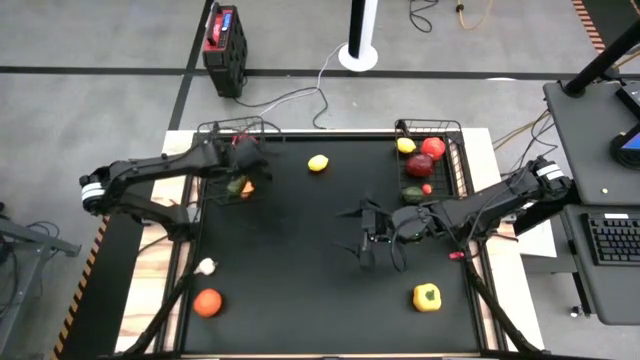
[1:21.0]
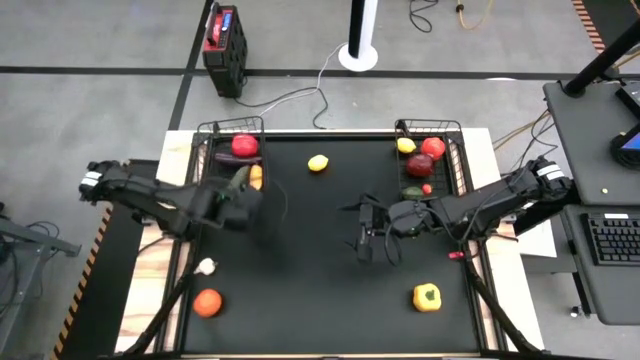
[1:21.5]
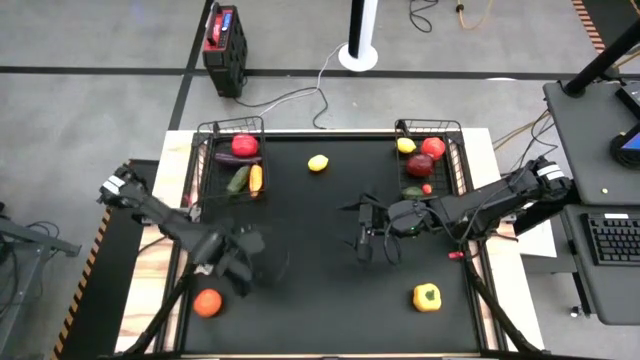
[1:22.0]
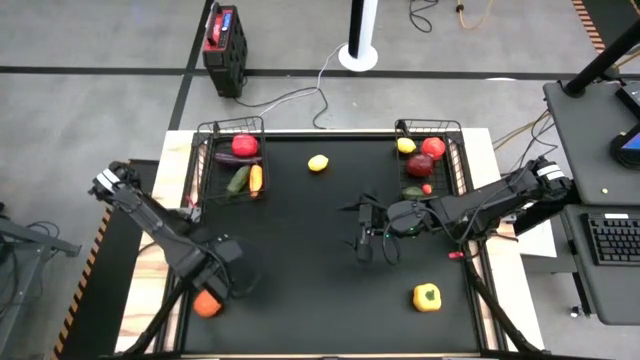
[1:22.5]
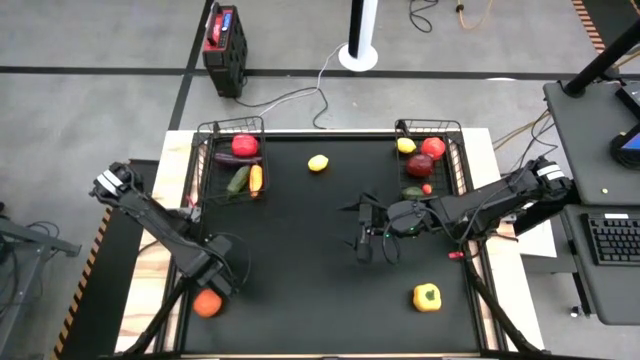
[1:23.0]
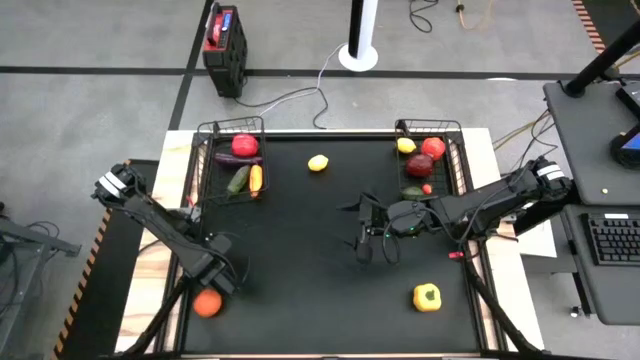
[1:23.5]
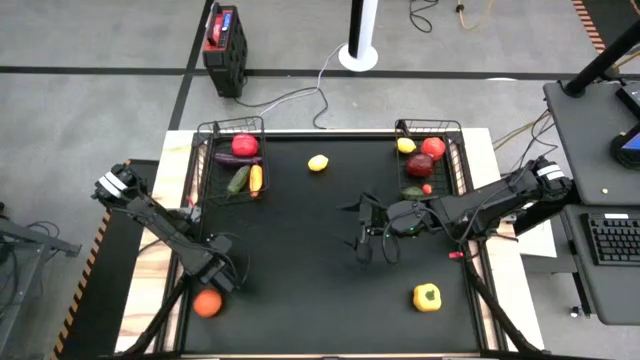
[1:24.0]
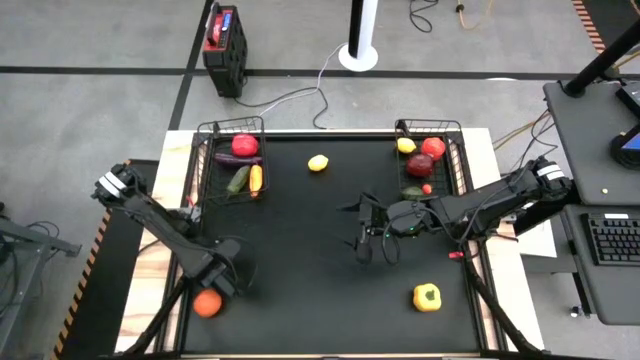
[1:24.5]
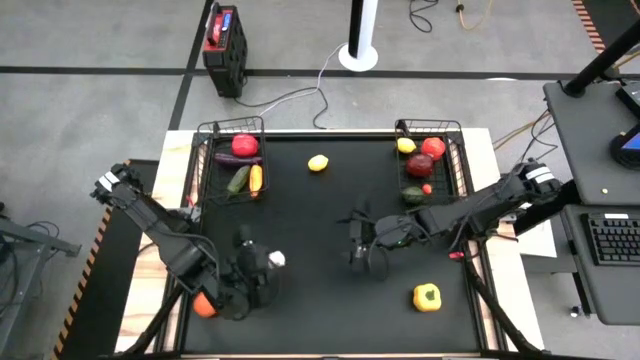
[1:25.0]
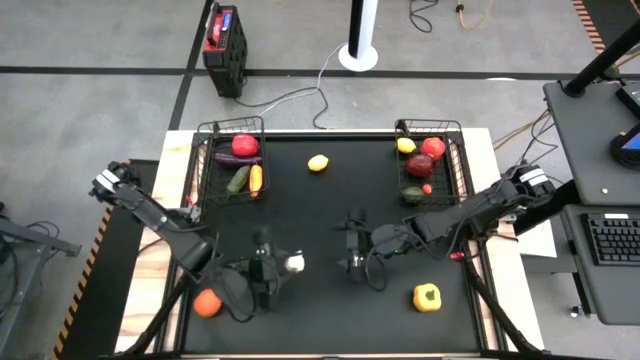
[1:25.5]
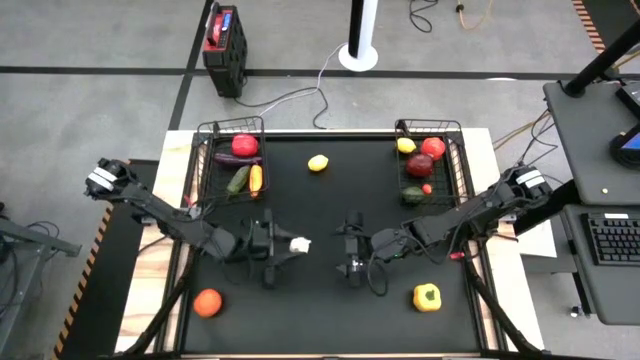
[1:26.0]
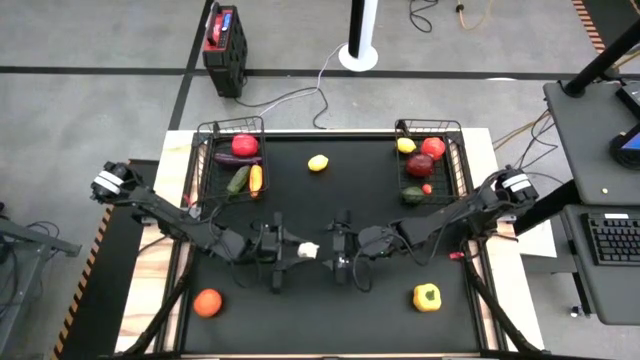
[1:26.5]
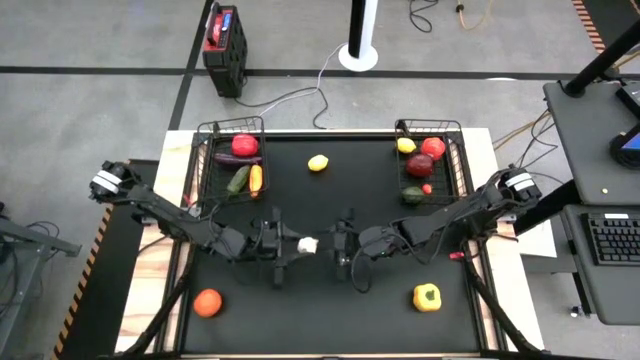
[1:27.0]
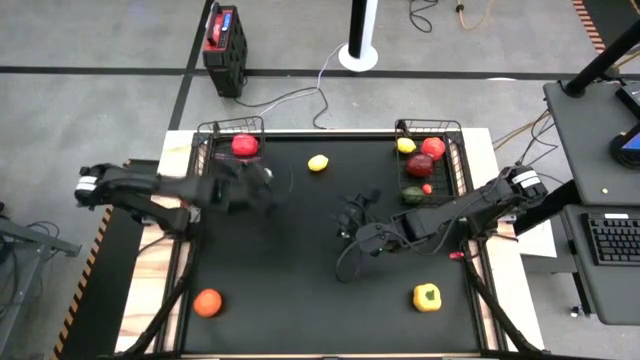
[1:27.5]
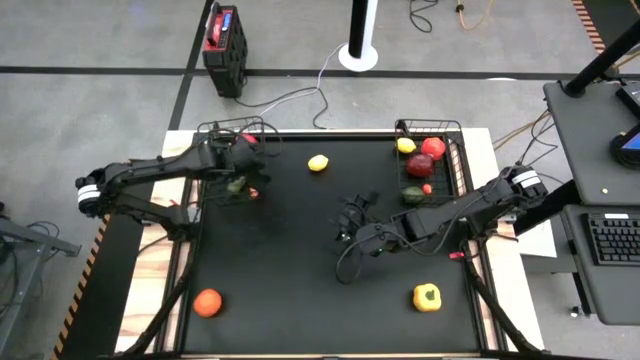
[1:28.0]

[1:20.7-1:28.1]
Task: Sort produce into baskets
Put the white garlic into the left wire basket

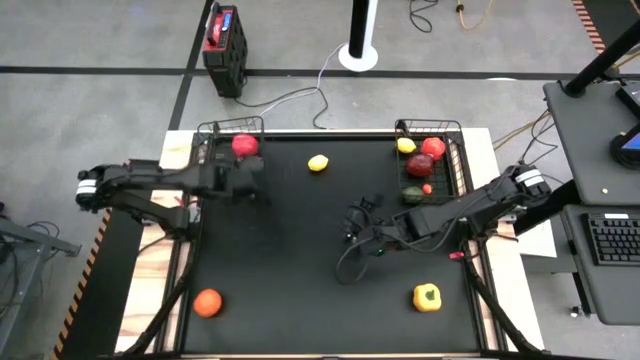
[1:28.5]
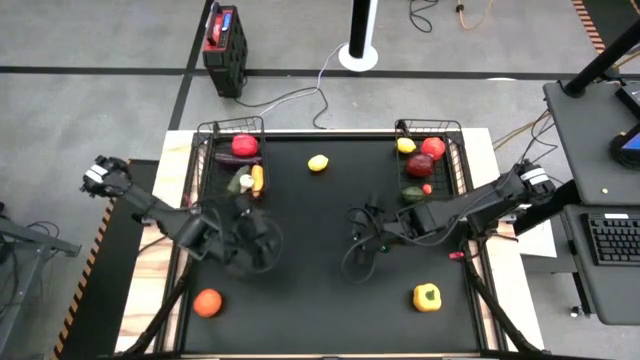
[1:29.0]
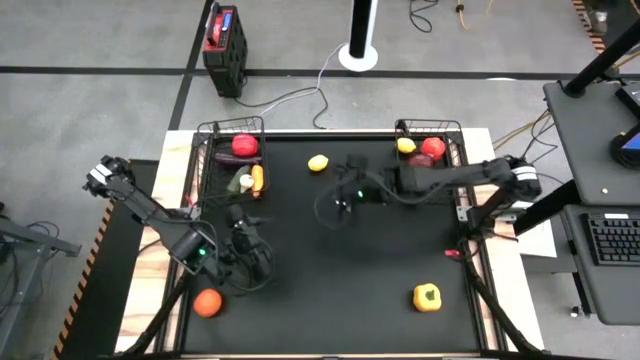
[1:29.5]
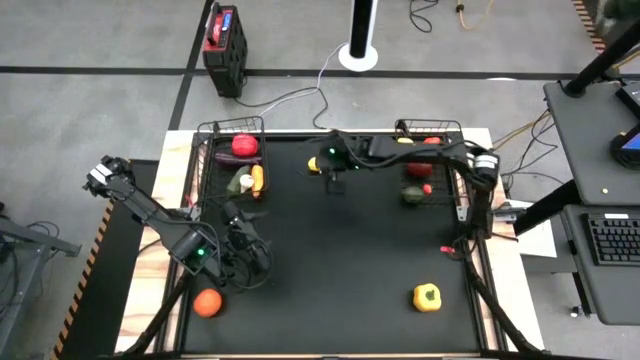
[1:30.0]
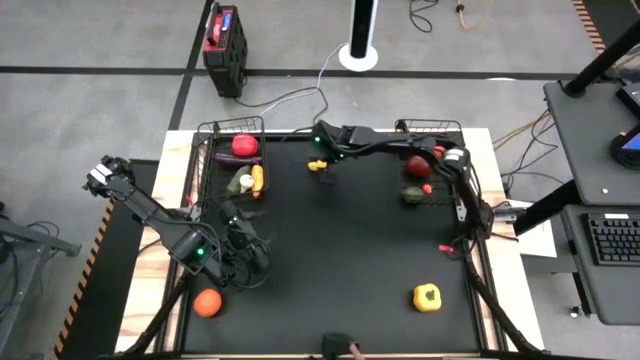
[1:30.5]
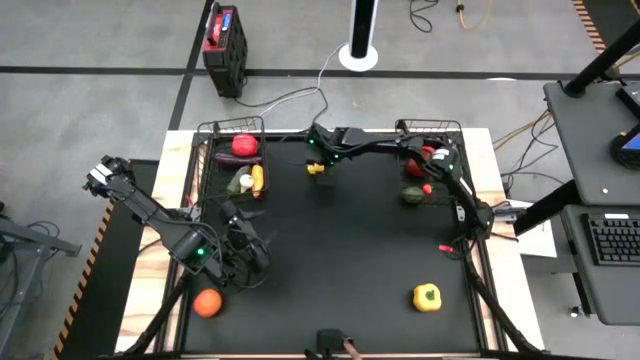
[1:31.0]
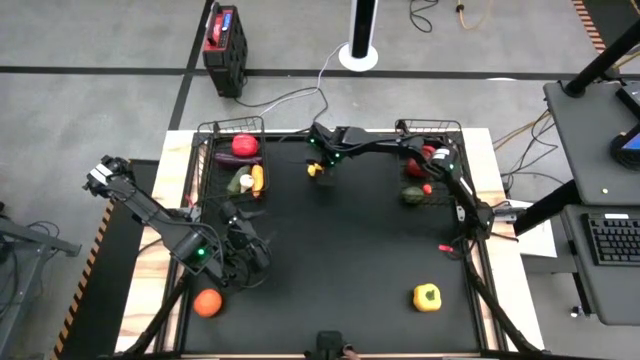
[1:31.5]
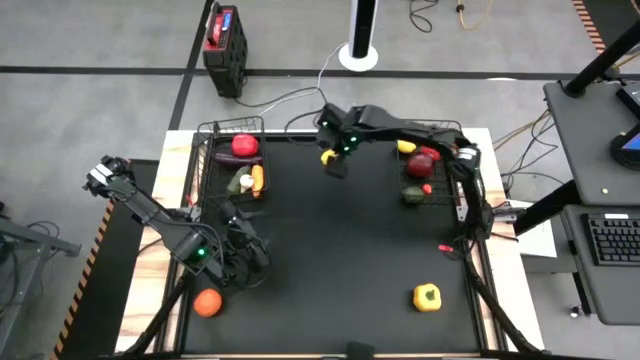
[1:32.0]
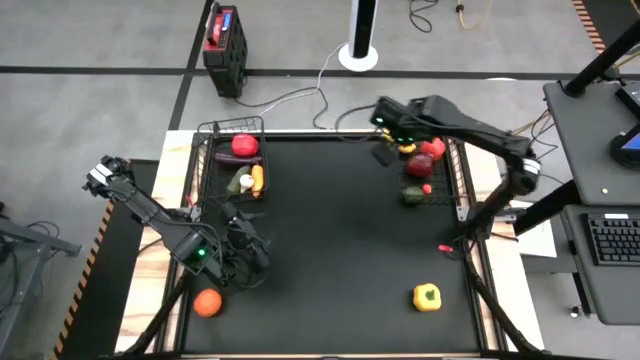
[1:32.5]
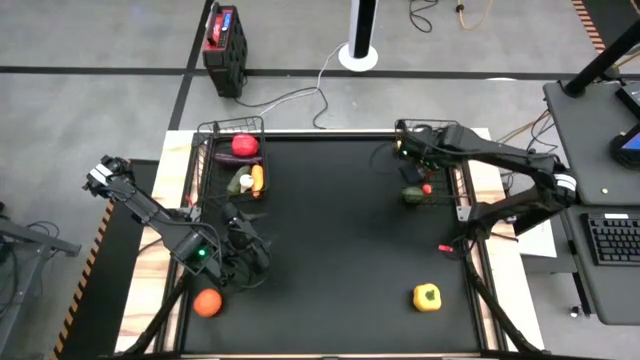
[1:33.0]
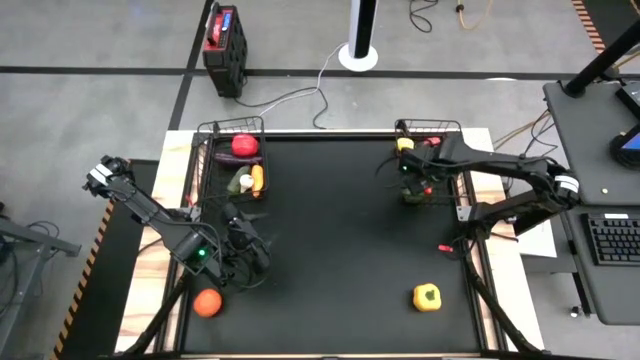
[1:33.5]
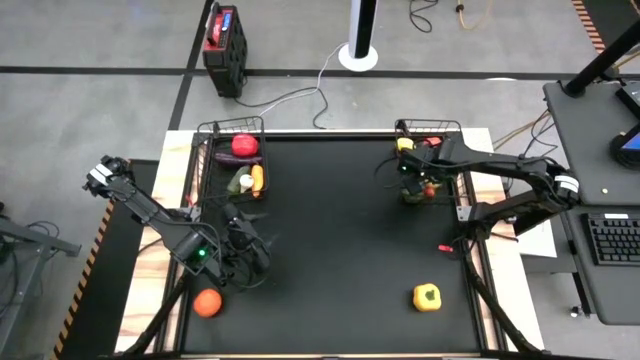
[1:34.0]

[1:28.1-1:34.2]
Put the yellow lemon into the right wire basket

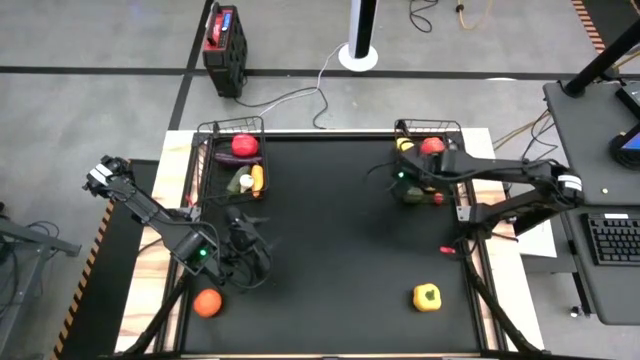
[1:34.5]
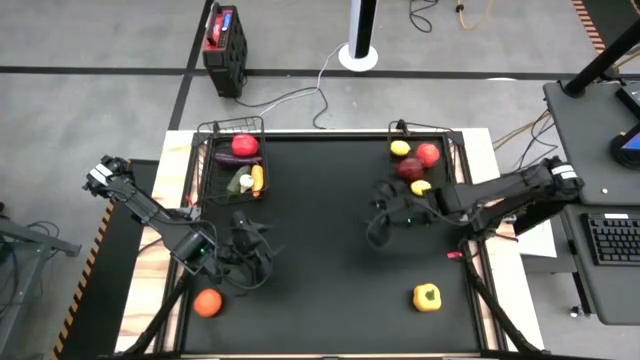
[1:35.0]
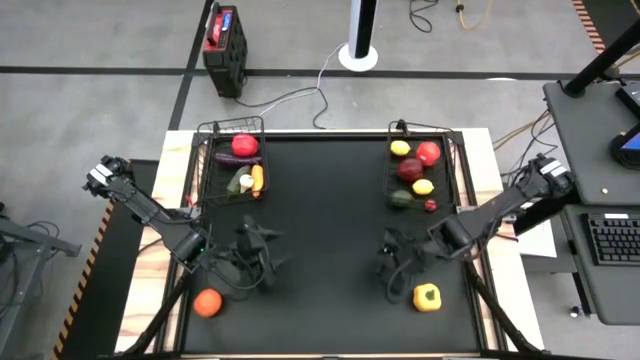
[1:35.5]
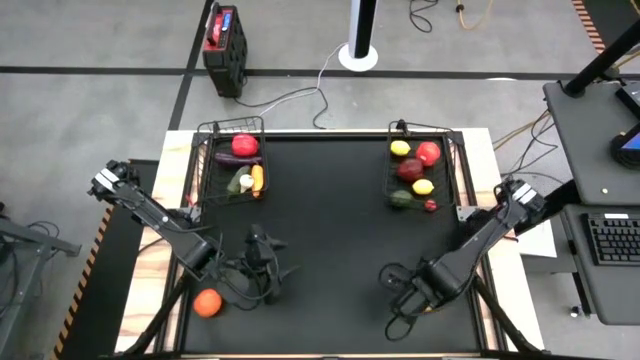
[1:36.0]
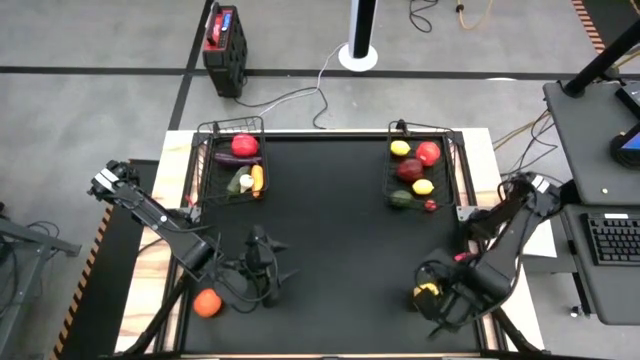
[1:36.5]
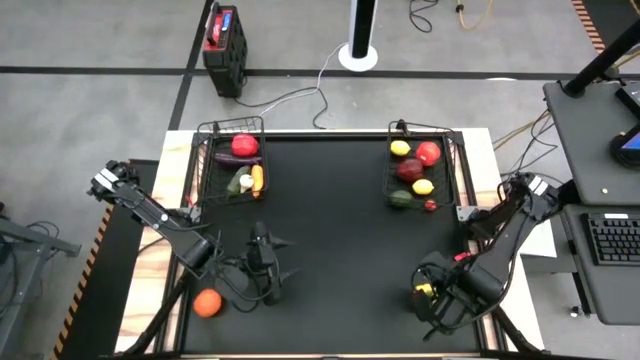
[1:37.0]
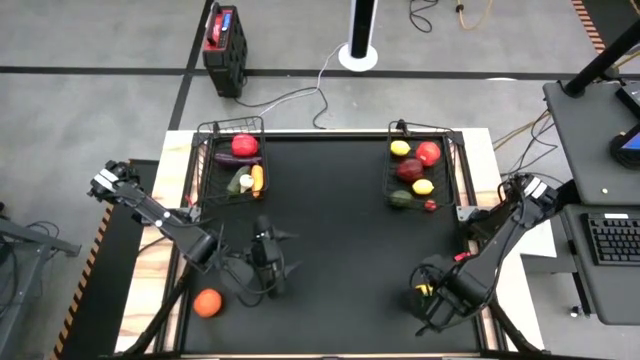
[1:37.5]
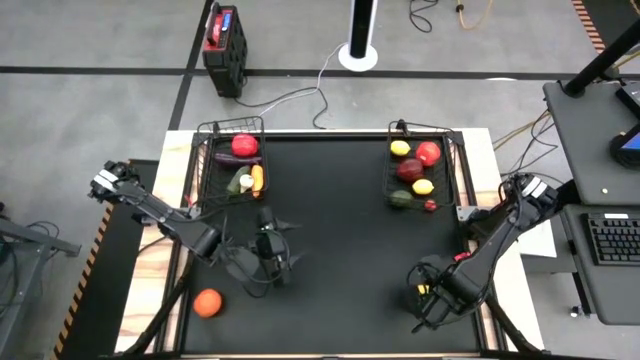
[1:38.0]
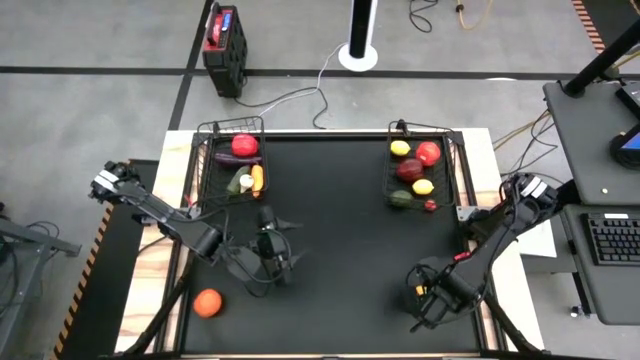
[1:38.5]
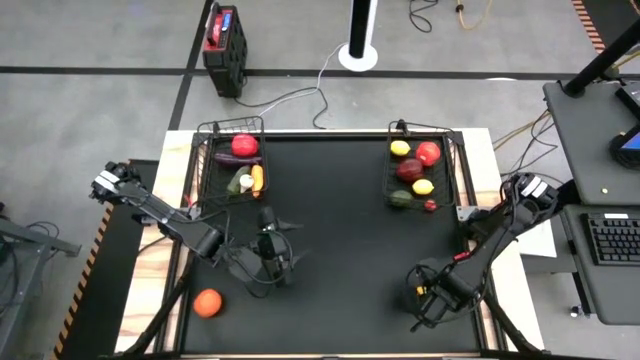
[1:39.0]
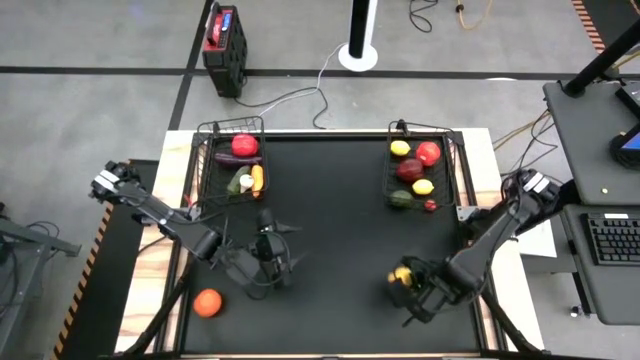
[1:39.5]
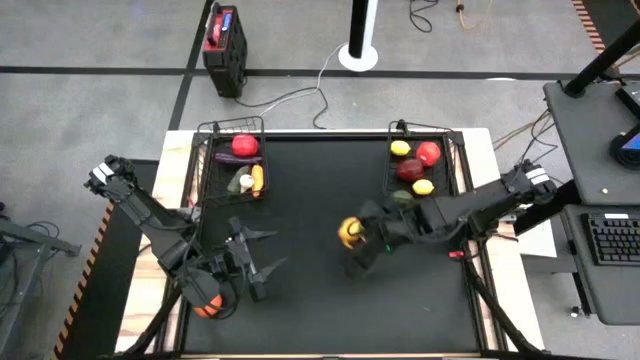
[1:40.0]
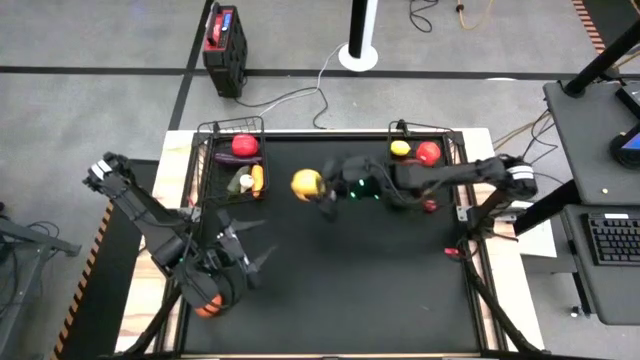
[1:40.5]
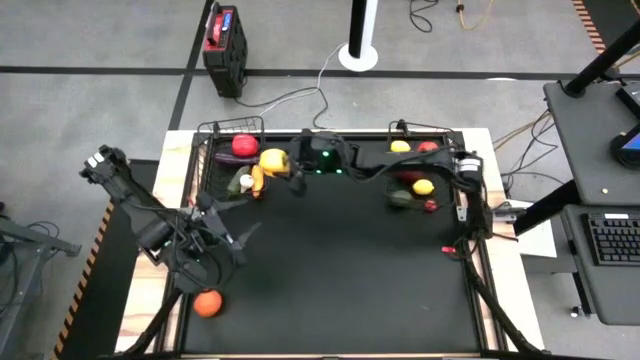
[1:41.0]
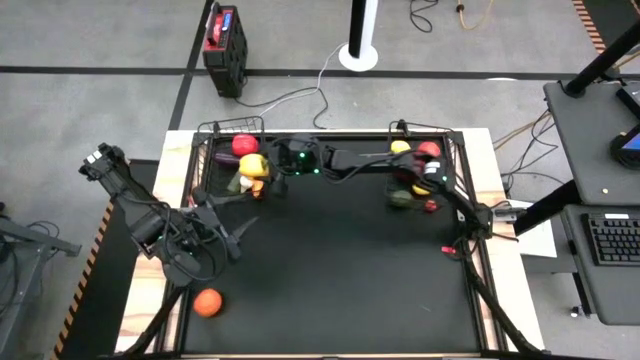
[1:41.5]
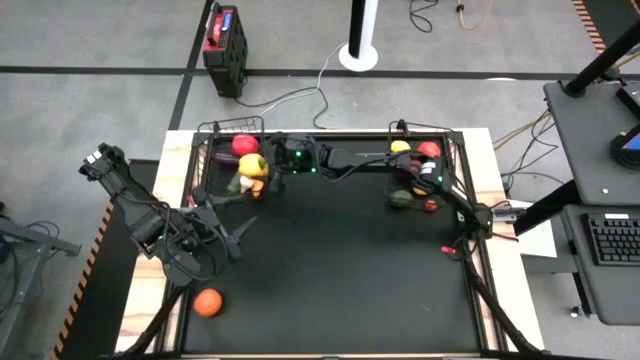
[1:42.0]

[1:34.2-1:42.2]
Put the yellow bell pepper into the left wire basket
